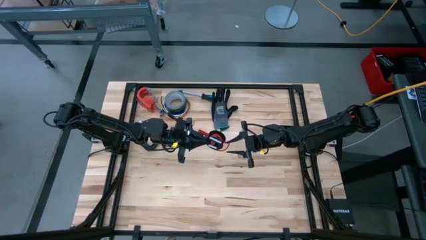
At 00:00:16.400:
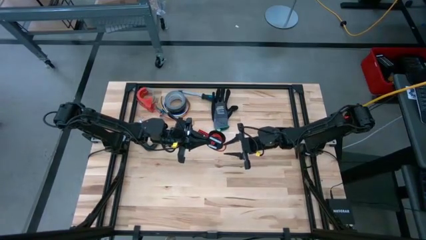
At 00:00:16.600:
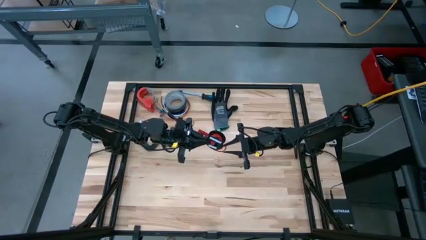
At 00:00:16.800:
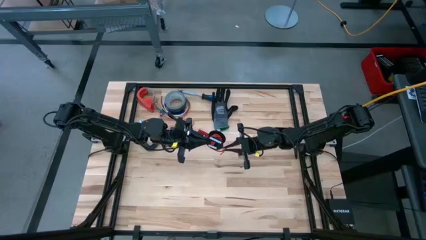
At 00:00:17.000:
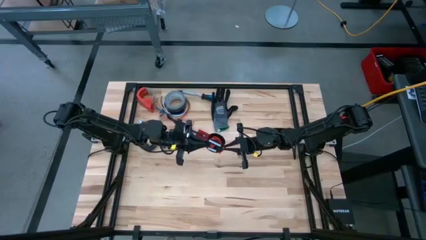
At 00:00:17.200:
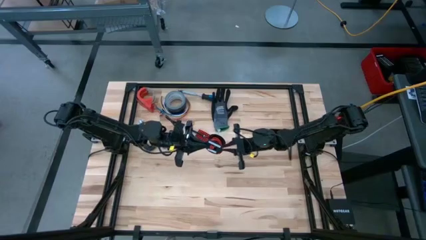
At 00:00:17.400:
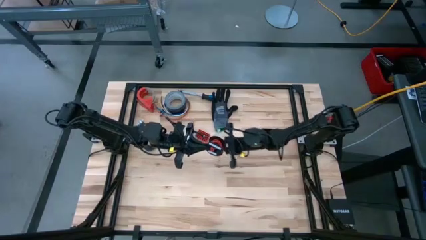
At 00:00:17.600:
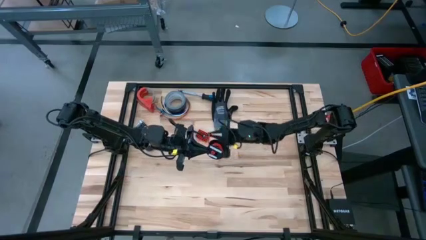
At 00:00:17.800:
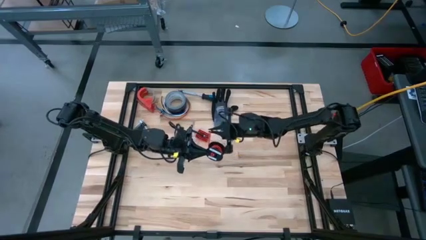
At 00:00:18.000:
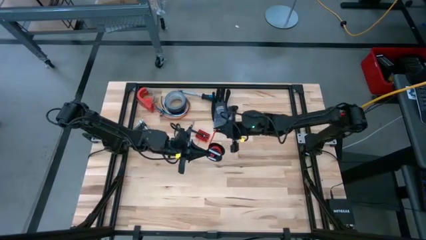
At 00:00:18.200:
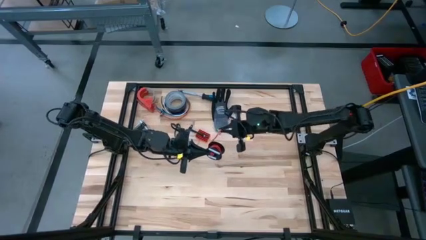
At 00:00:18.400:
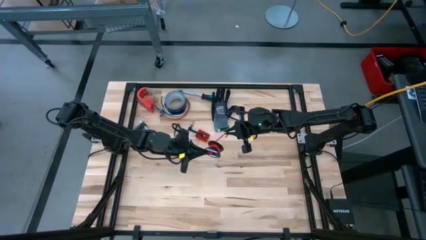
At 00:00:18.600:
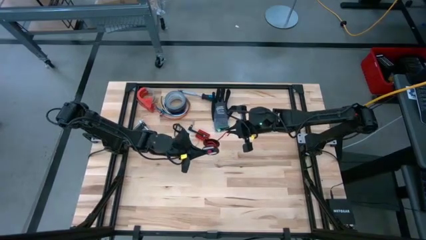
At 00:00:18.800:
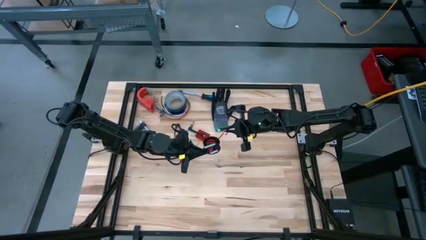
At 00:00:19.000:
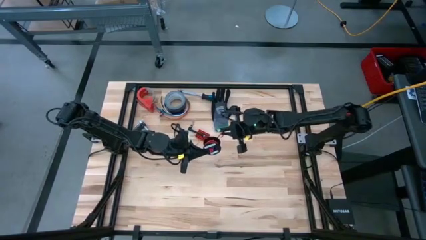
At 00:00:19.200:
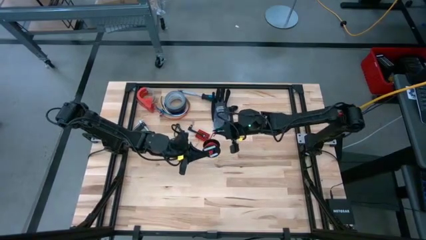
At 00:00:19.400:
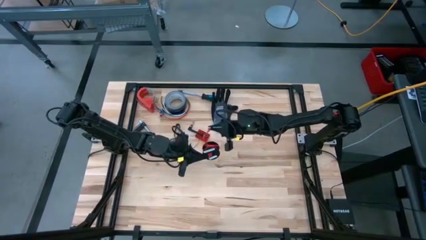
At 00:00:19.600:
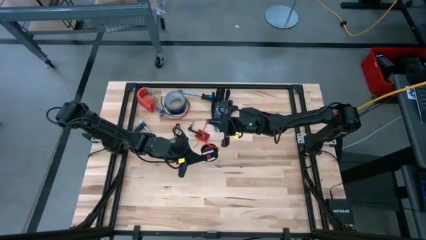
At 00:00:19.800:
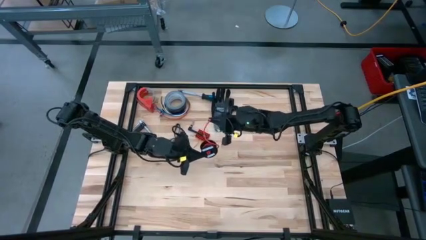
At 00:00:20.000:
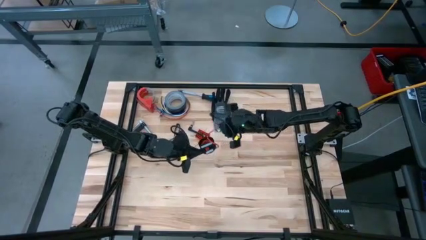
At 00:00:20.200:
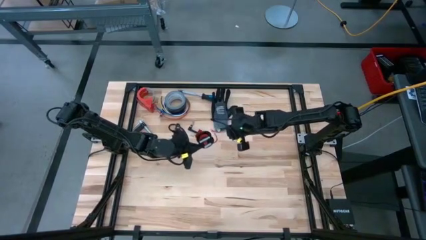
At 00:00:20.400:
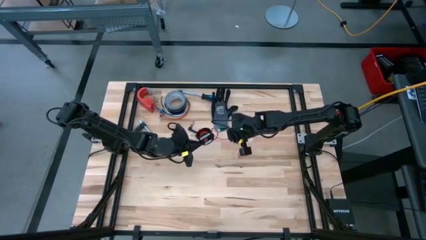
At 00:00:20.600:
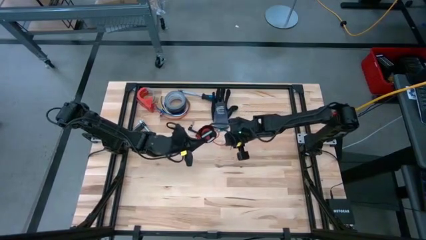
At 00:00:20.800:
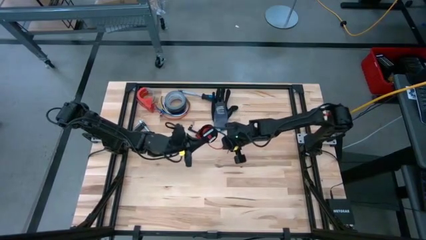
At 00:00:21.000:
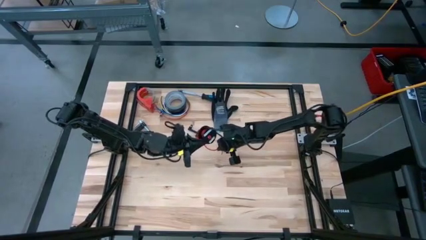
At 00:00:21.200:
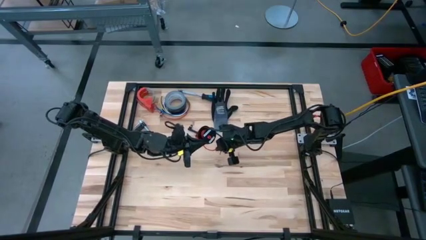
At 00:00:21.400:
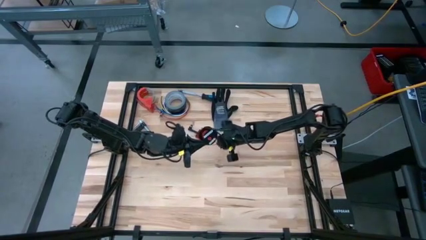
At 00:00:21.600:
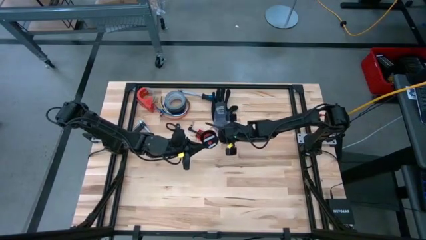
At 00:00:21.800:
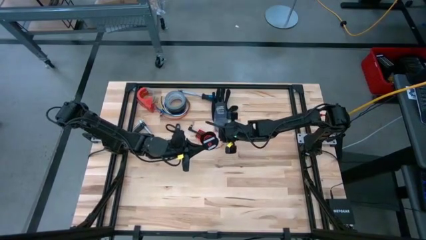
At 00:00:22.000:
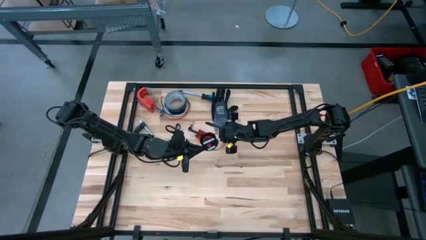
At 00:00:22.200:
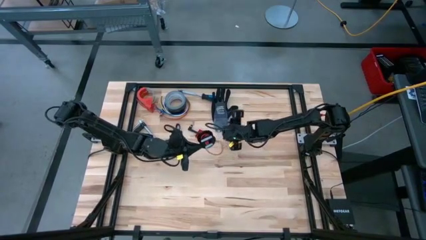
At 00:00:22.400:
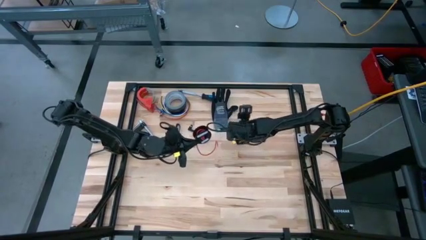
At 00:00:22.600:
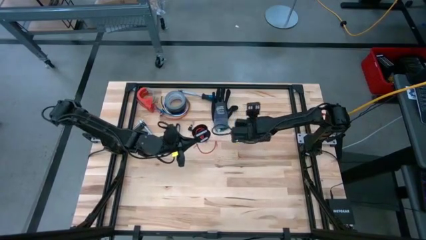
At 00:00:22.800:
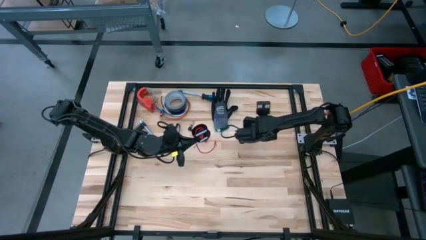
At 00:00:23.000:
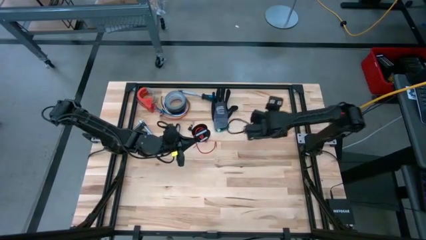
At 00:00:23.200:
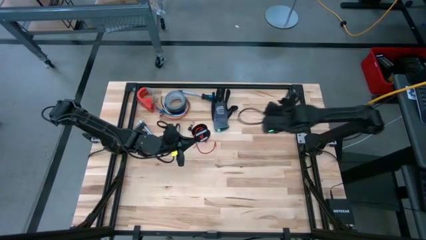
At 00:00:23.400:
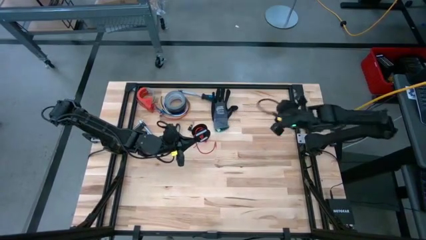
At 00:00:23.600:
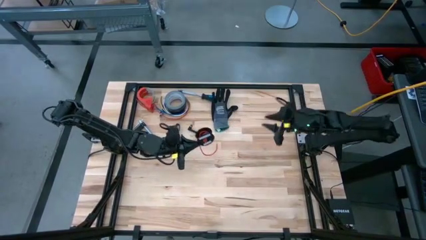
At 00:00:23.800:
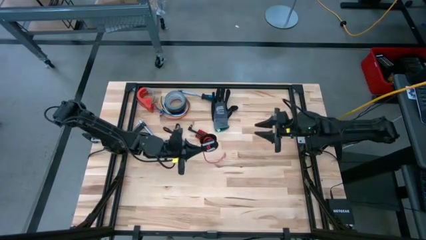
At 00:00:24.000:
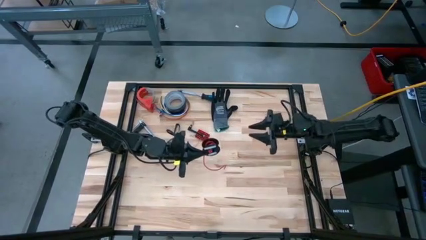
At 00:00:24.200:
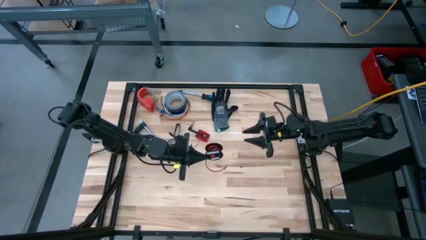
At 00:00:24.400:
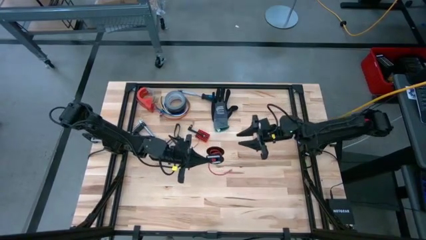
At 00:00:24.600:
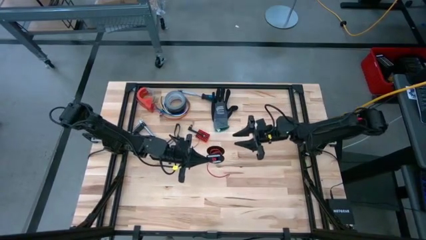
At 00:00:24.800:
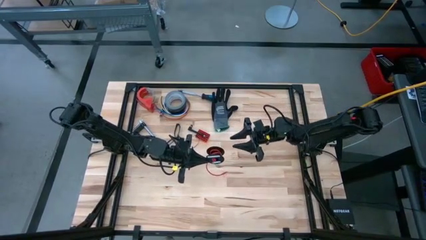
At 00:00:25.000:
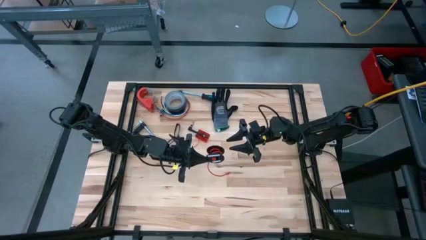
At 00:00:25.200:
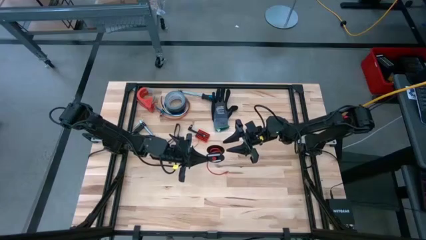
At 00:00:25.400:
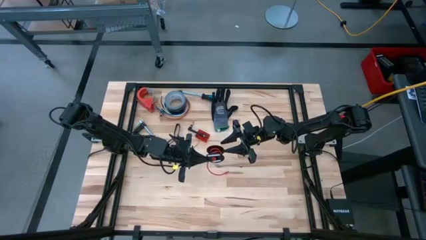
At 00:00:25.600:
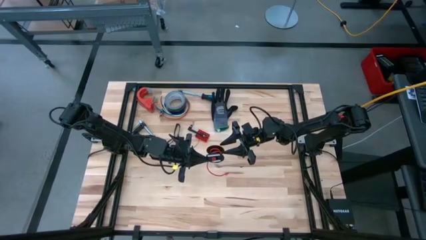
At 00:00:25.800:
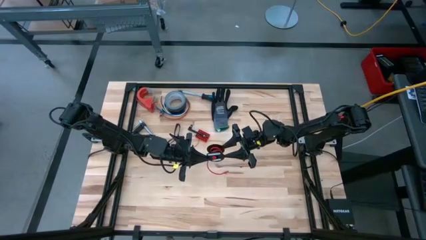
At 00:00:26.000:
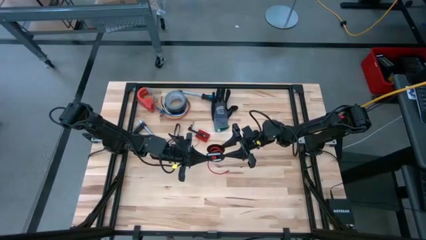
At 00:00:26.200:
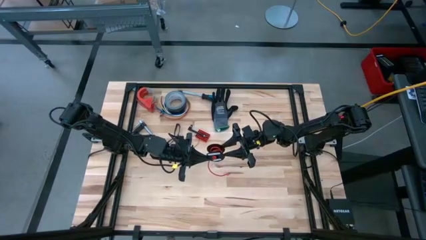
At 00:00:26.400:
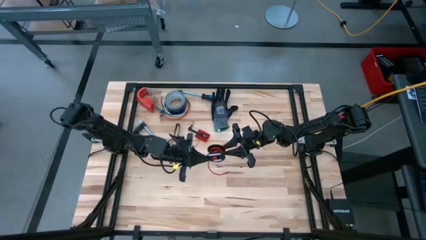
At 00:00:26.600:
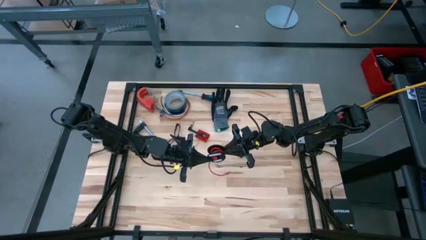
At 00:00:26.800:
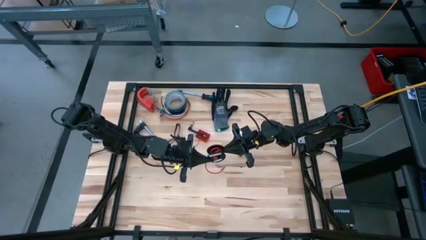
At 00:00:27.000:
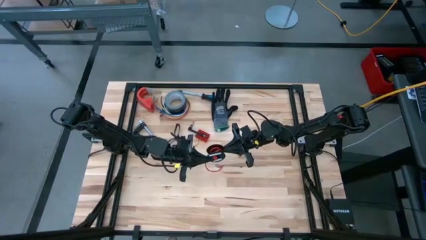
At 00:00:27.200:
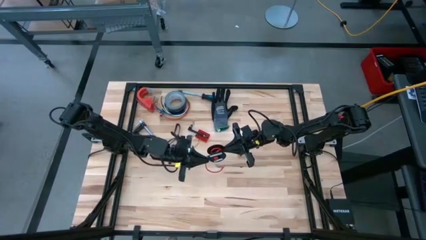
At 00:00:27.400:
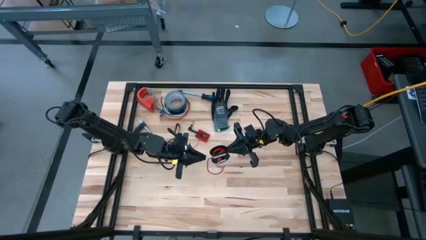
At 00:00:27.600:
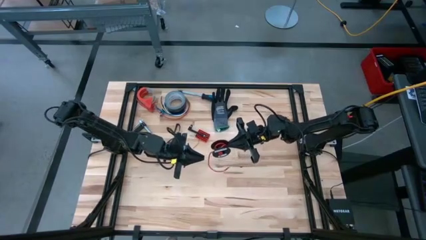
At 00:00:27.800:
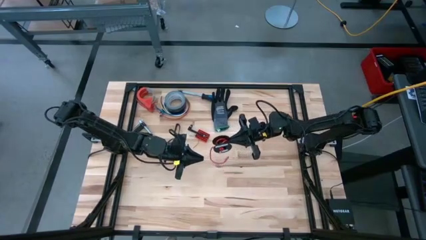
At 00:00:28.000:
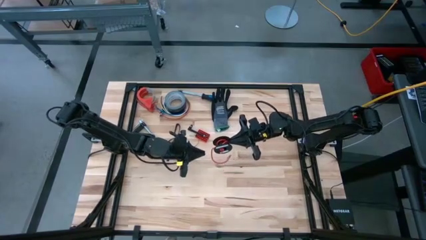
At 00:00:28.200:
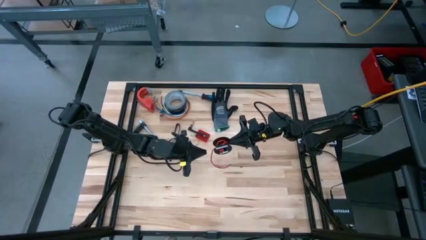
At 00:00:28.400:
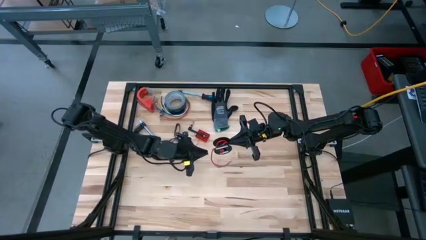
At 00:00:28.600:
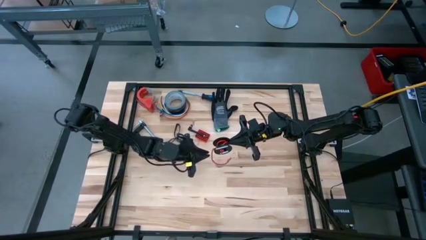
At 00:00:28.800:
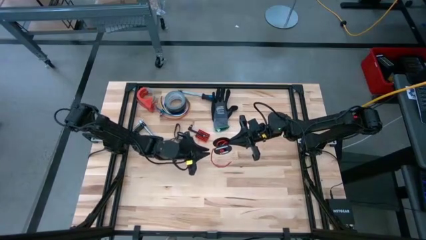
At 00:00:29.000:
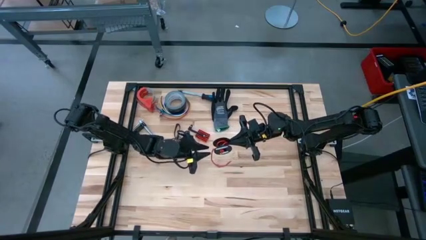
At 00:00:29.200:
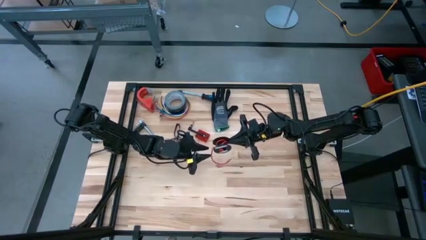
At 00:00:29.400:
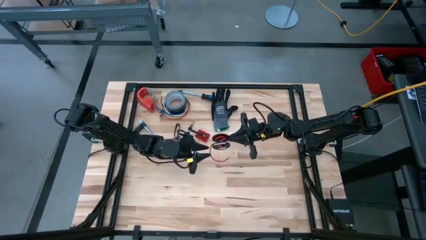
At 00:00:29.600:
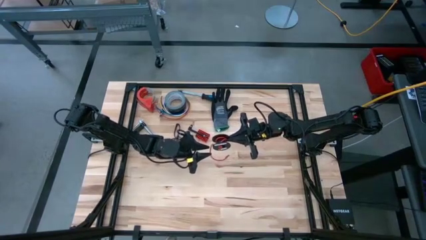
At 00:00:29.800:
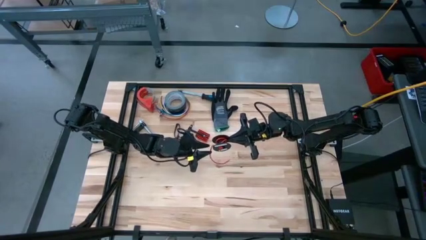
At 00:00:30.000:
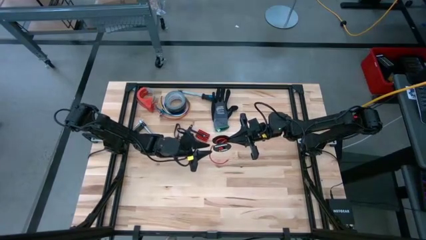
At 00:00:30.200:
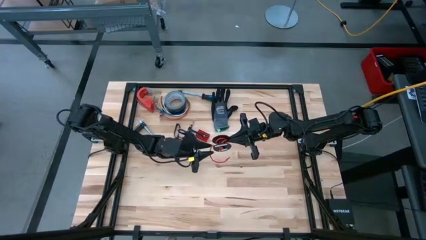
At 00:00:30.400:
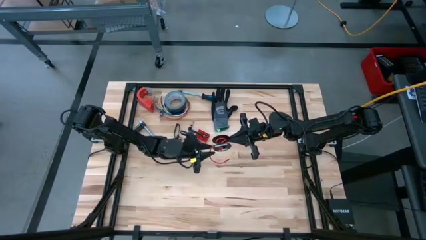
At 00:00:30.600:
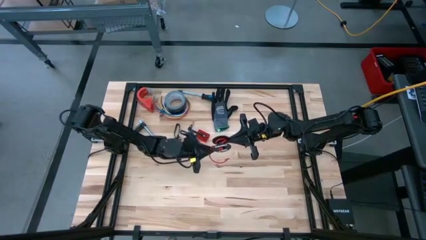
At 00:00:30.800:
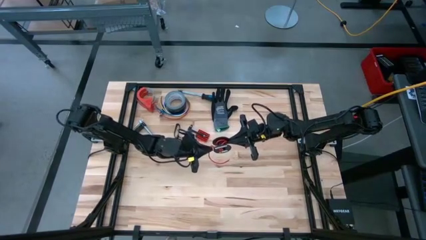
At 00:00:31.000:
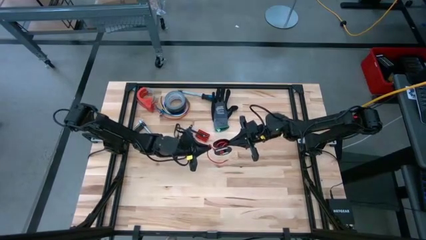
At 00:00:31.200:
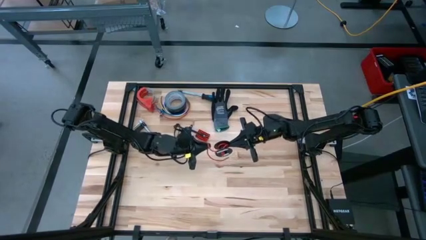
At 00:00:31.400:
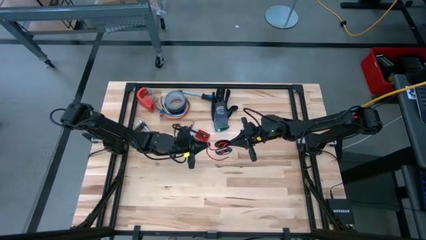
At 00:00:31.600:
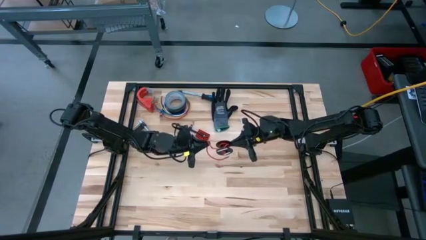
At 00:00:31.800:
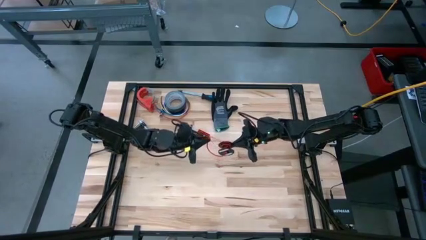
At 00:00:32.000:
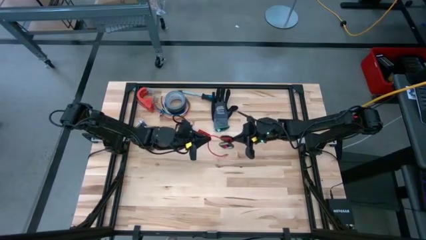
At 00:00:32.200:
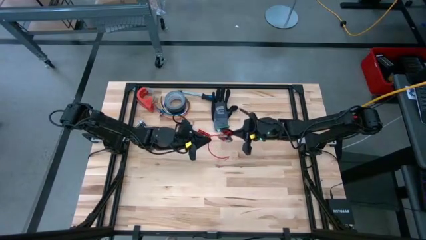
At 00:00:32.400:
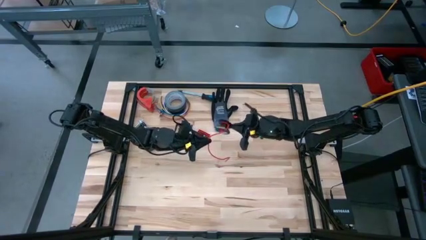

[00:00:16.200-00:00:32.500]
Task: Coil cords
Uncoil the orange wire from the black spool
